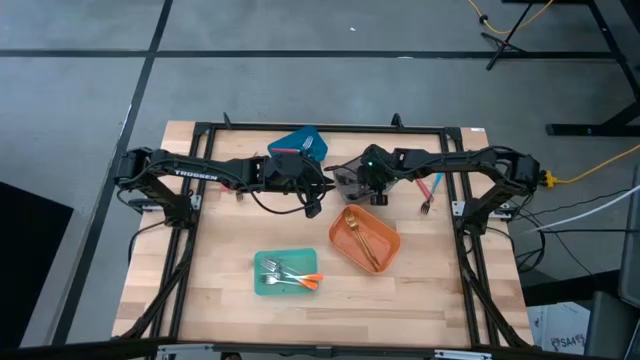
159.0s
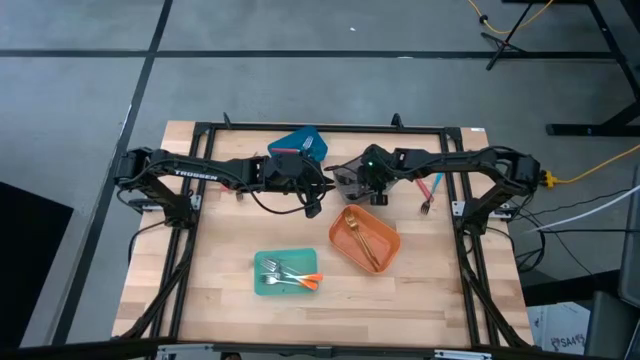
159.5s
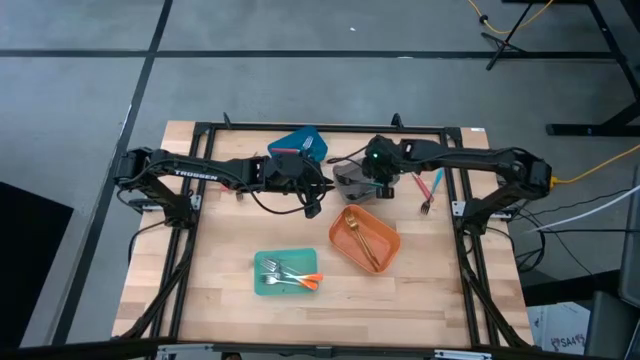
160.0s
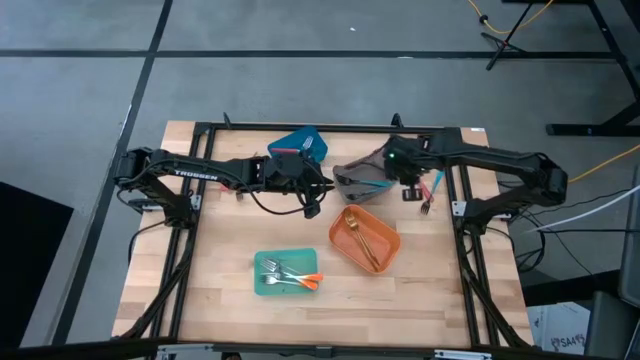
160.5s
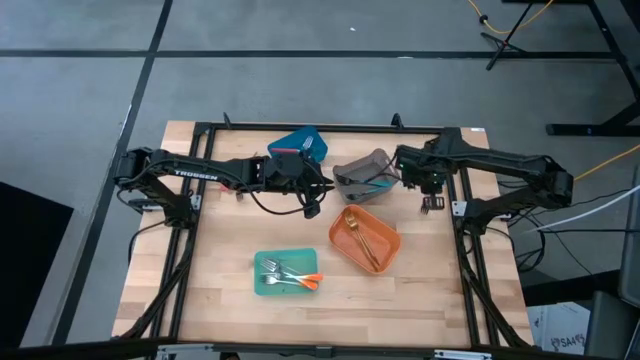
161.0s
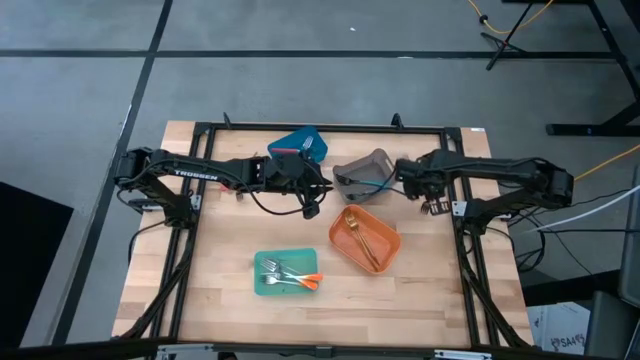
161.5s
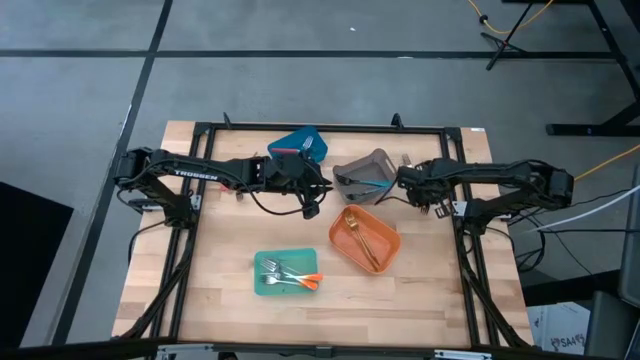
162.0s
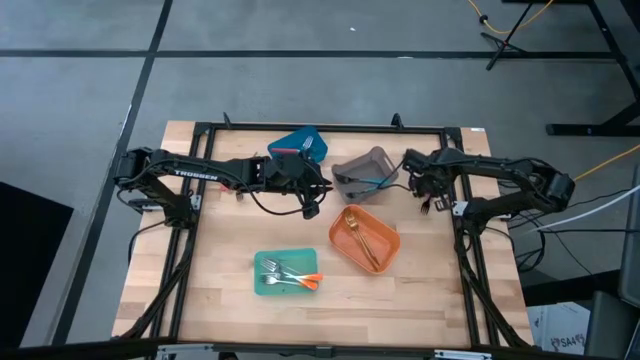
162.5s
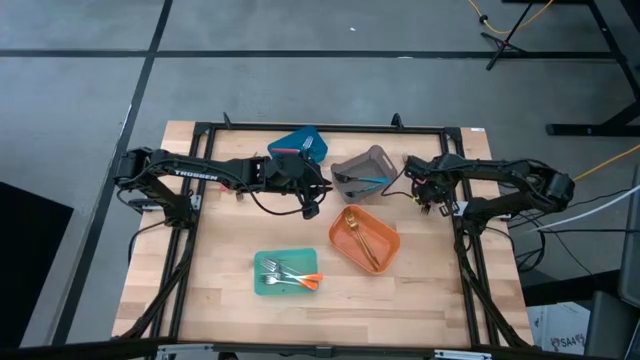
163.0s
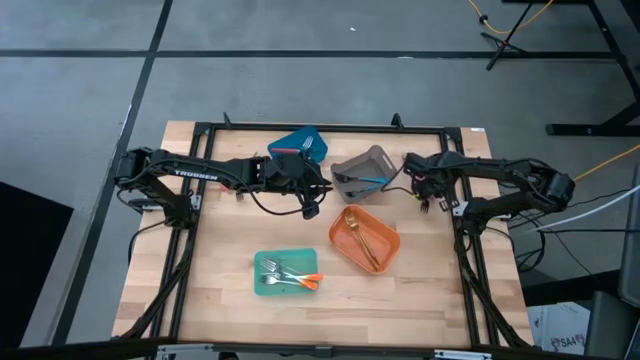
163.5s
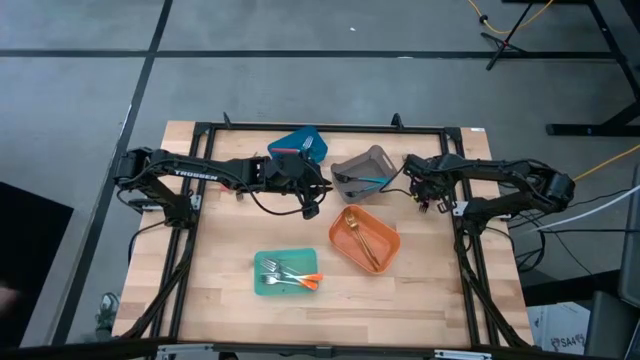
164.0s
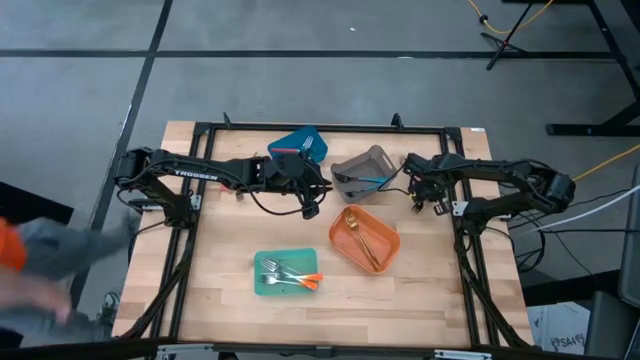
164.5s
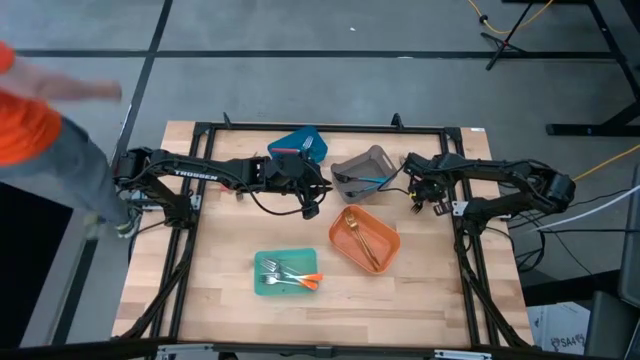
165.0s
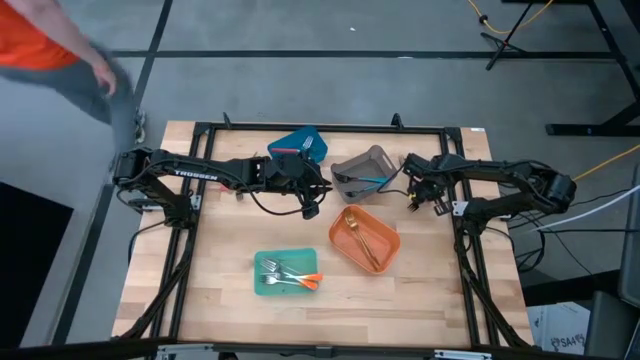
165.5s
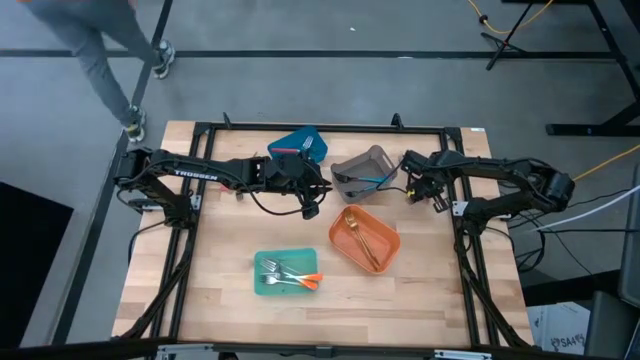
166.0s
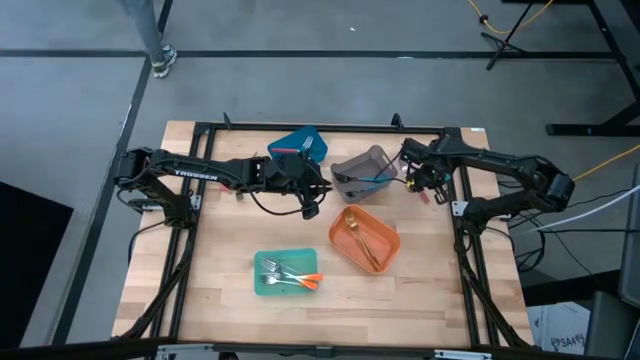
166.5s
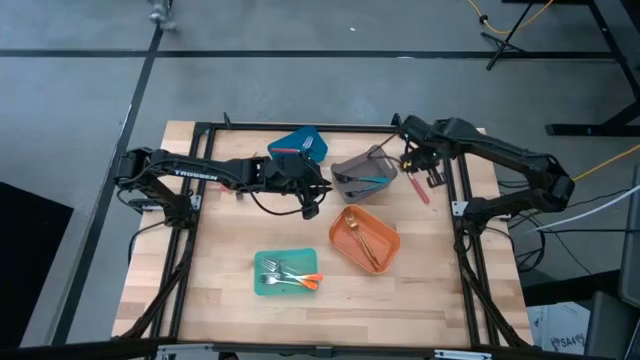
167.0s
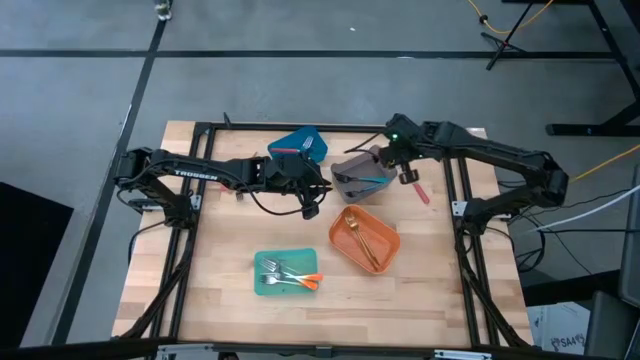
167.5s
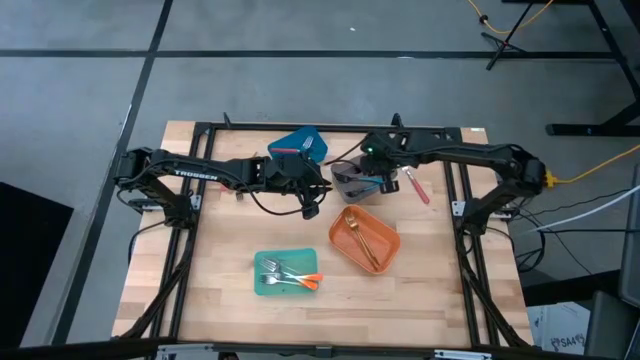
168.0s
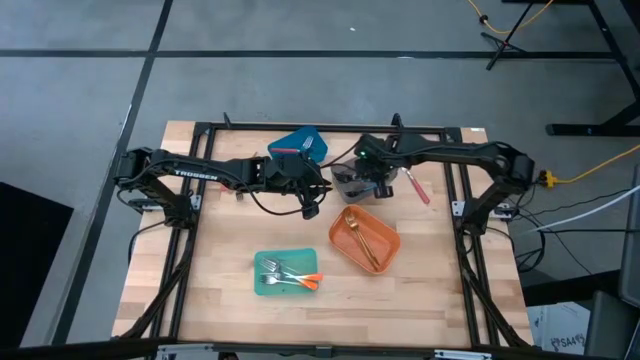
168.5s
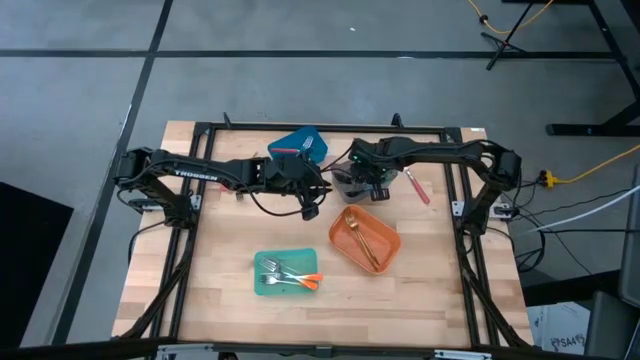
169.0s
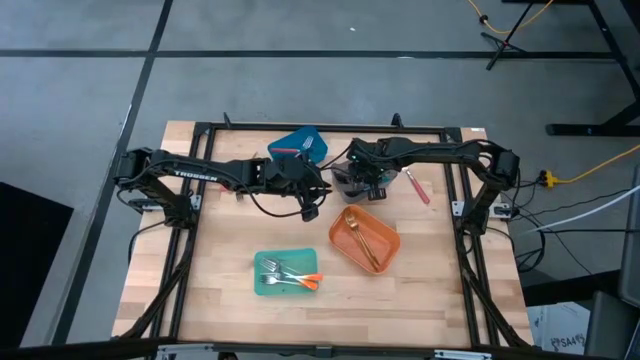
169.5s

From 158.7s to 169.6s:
Task: Sort silverware by color (type)
Put the blue fork into the black bin

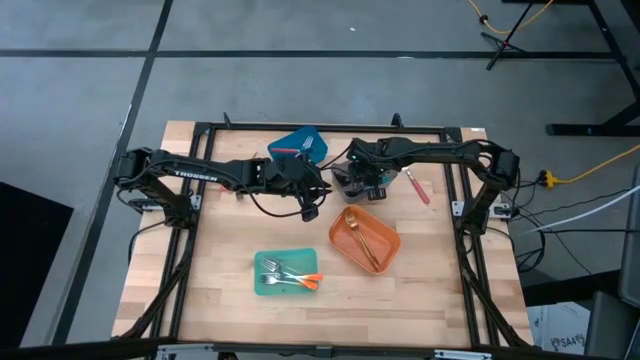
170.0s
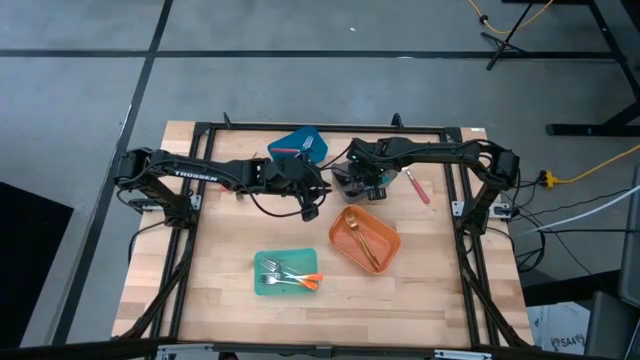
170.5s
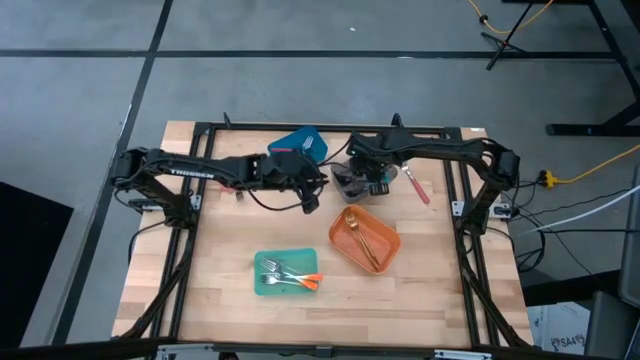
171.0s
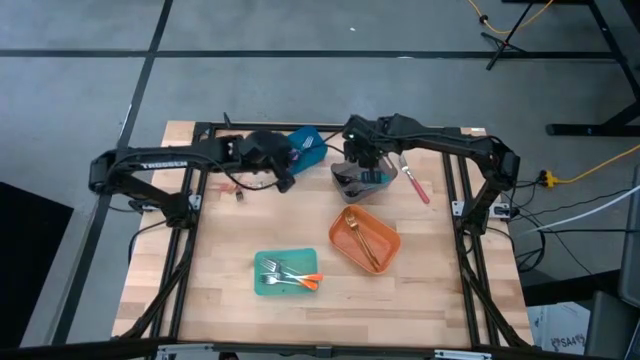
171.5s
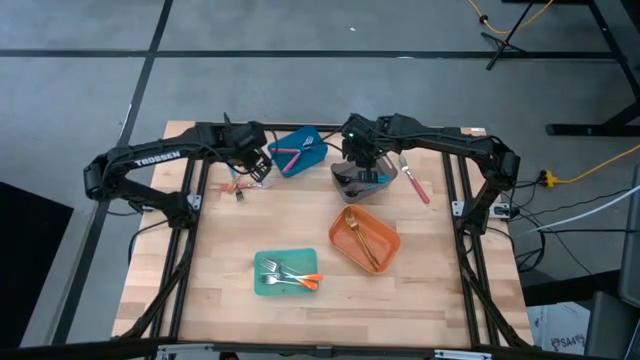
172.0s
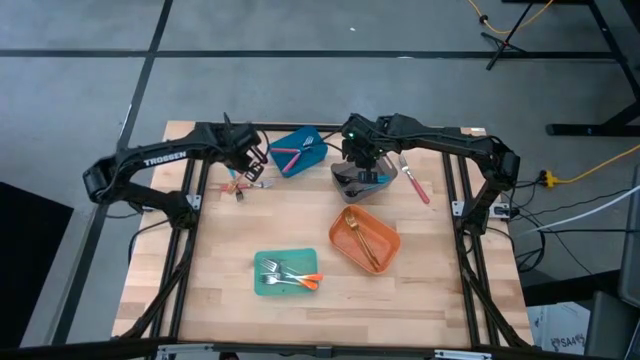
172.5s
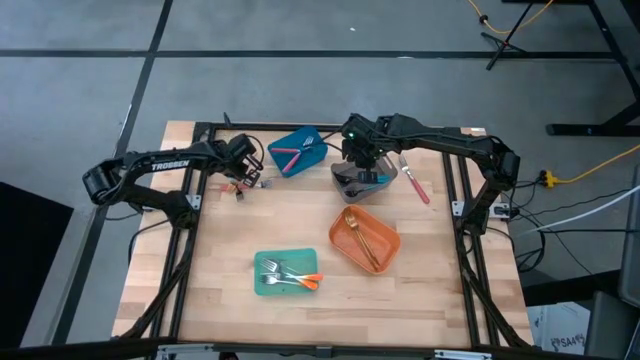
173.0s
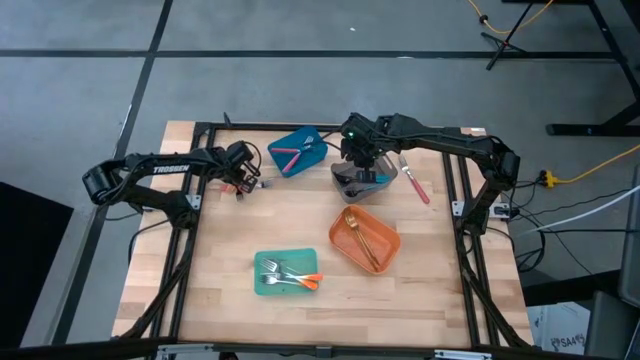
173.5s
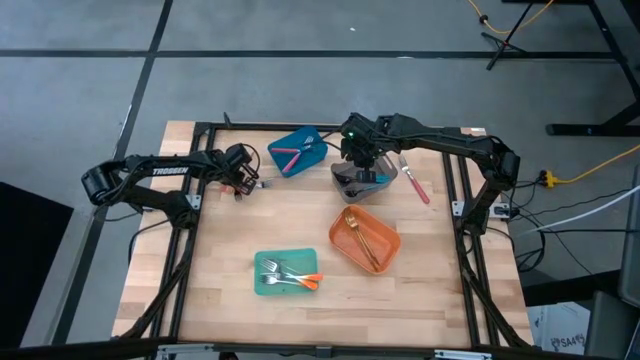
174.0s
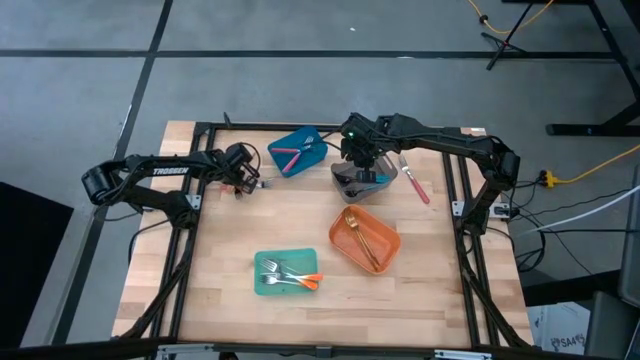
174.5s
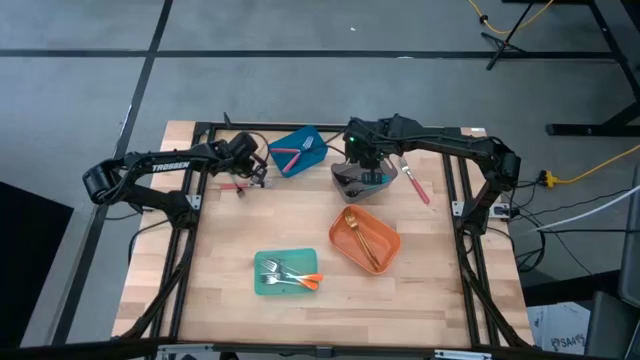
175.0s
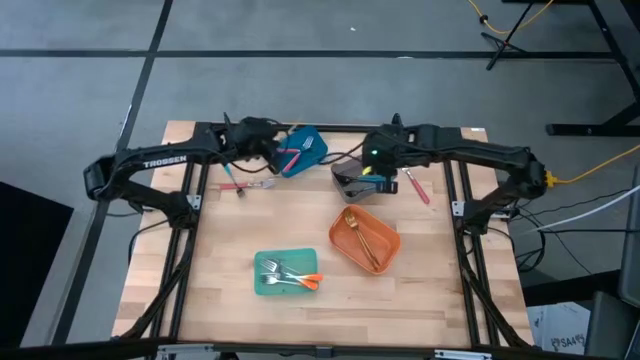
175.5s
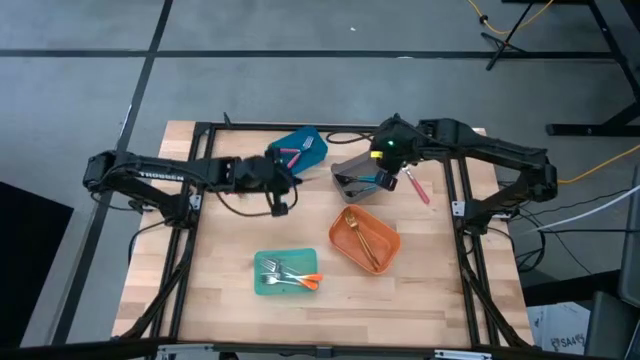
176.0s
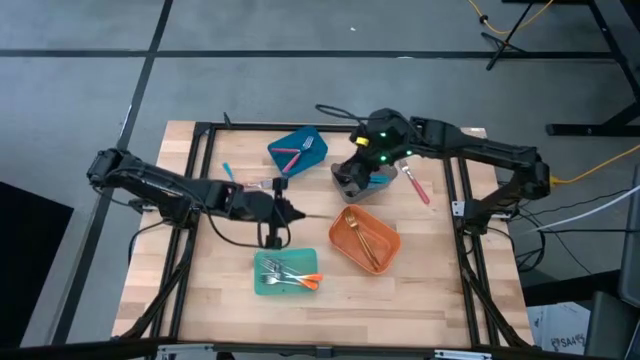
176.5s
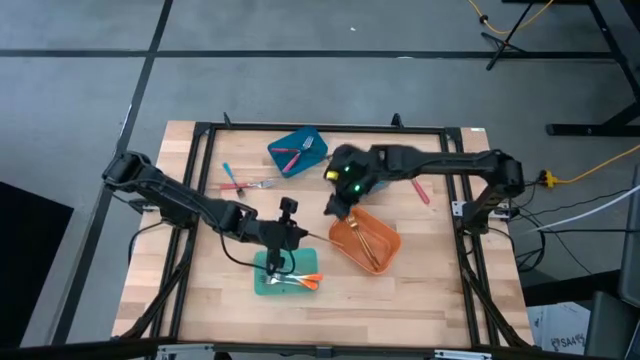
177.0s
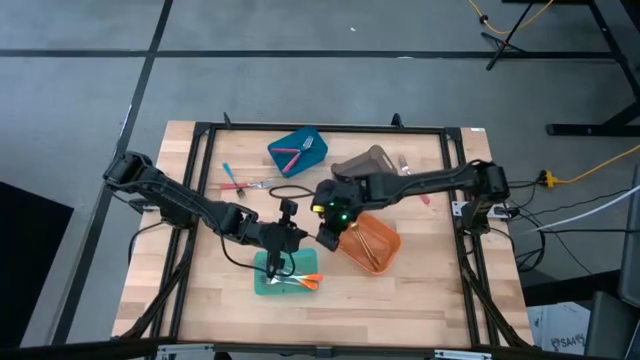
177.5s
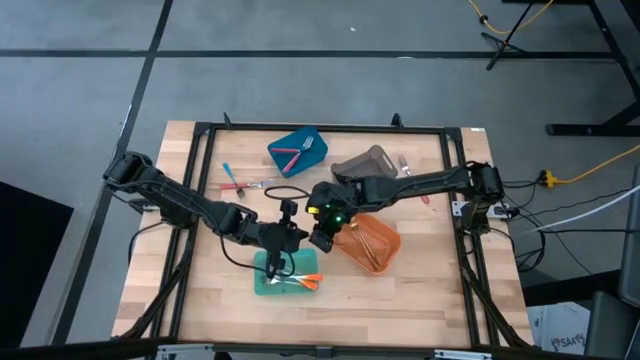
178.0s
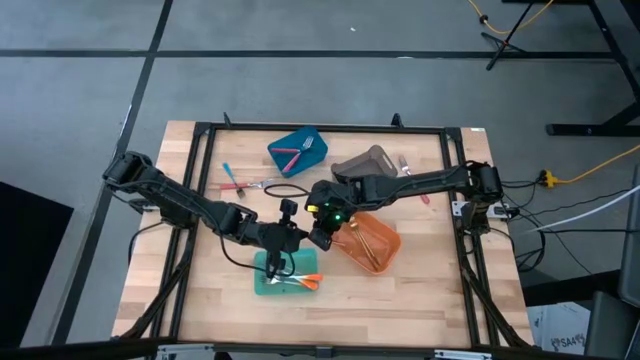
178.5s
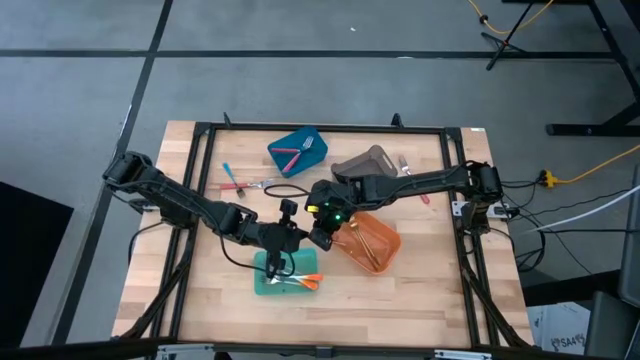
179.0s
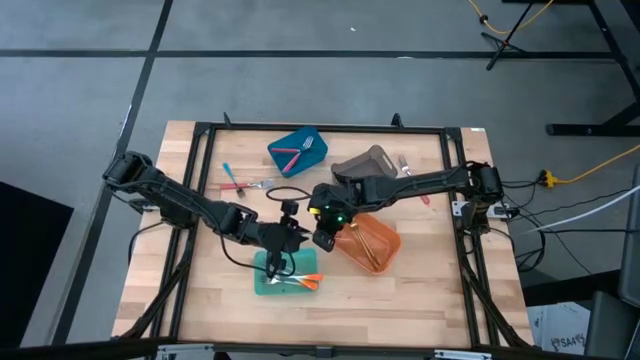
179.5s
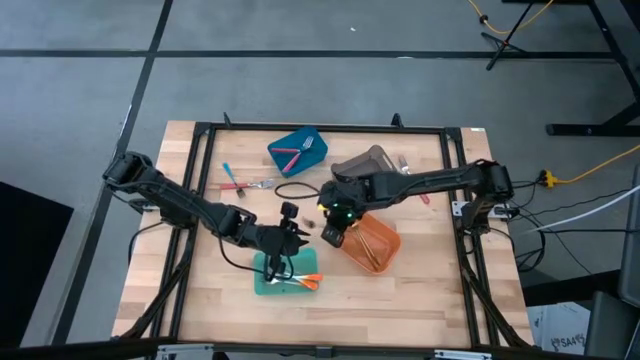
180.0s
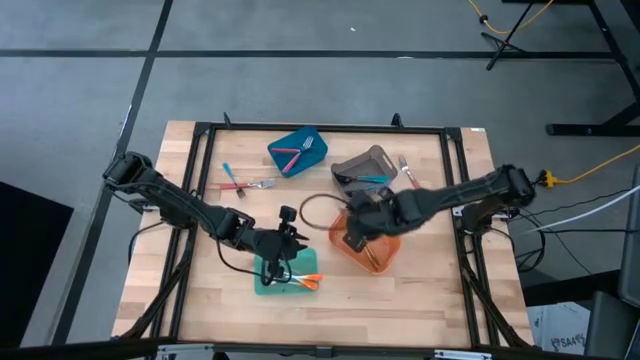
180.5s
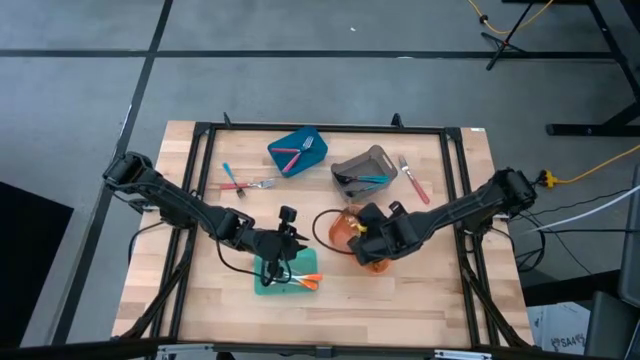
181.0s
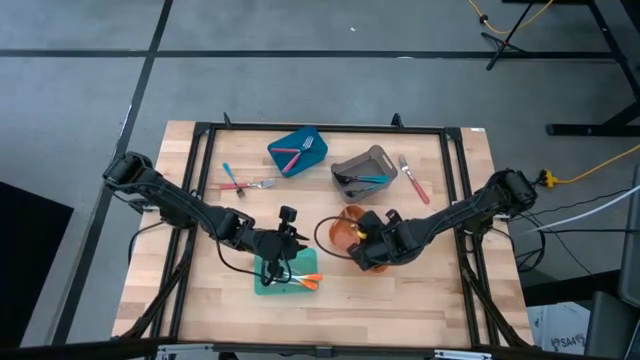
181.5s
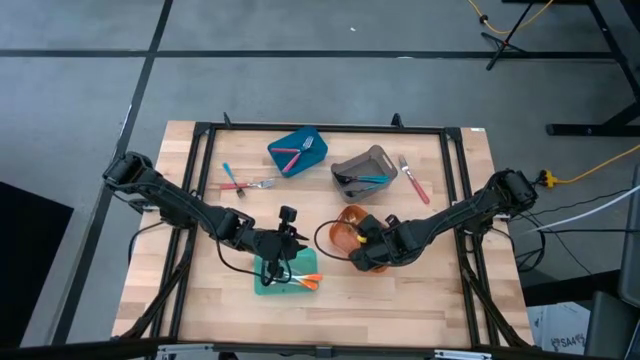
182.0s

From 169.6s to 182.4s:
Put the gold fork into the orange bin
